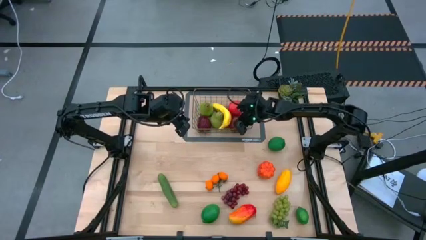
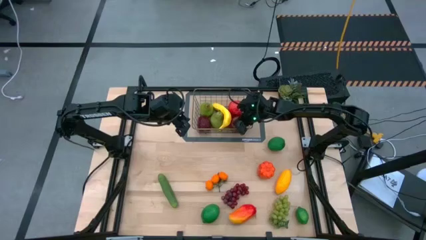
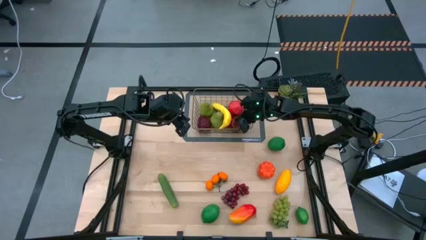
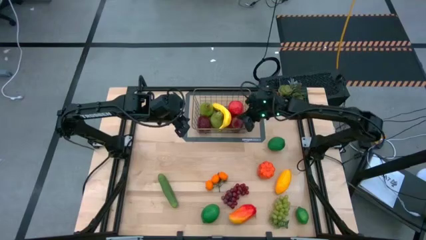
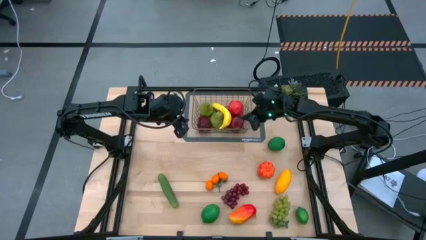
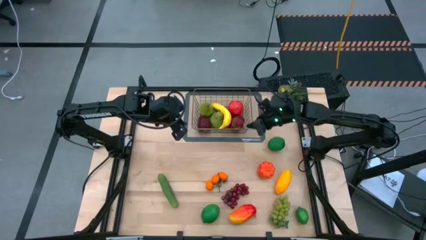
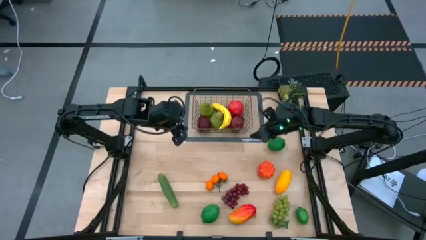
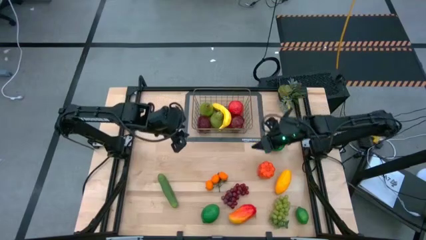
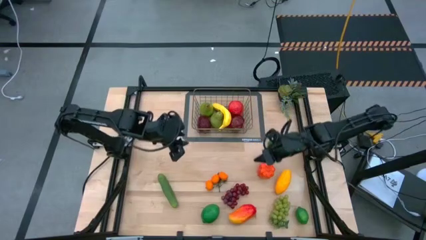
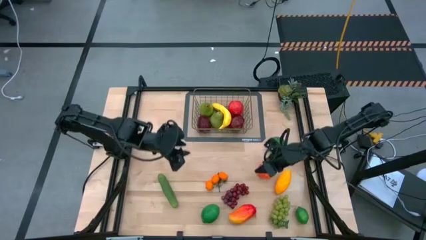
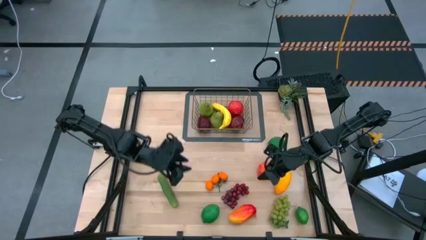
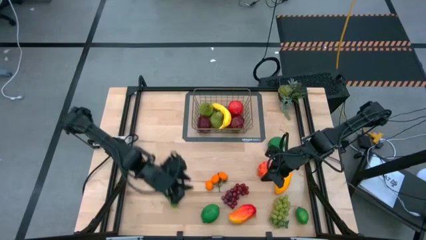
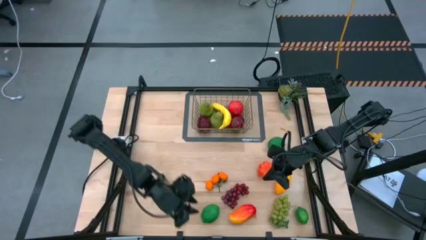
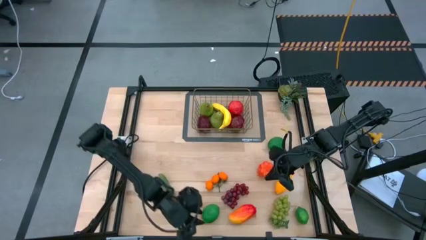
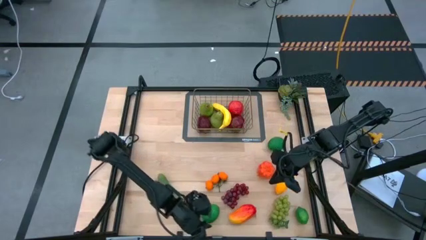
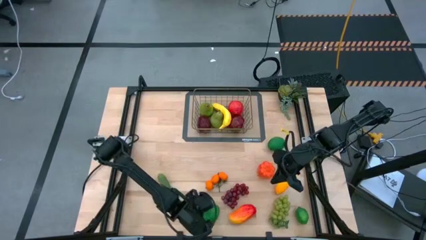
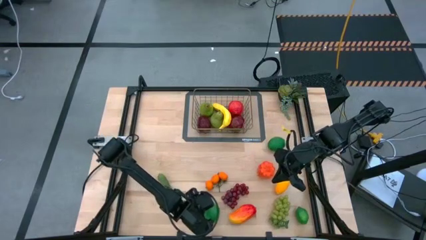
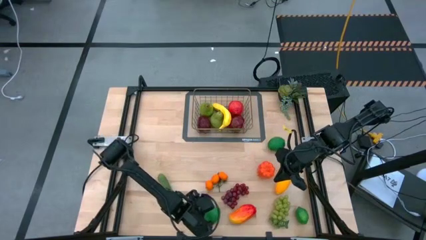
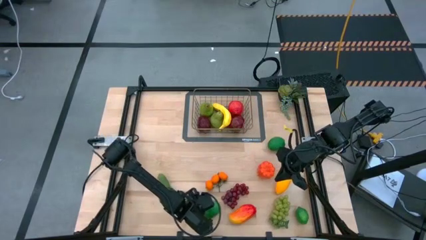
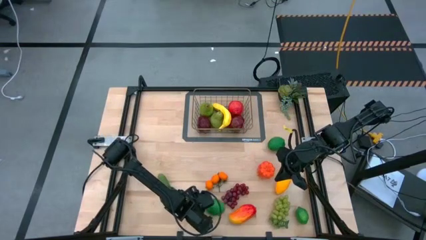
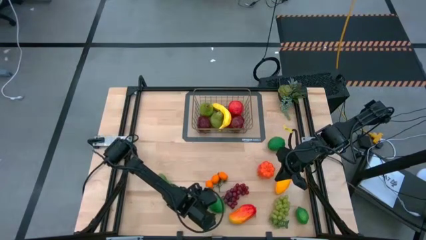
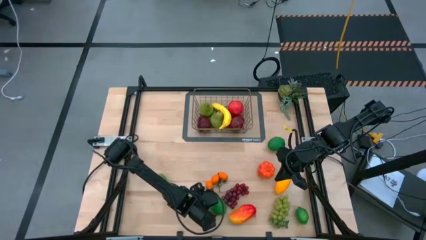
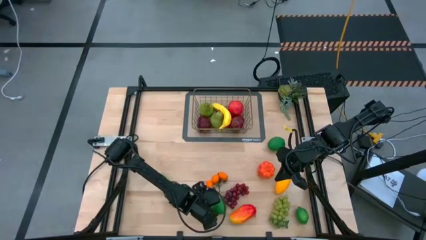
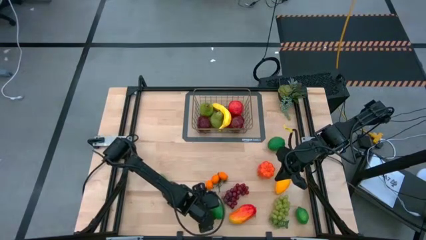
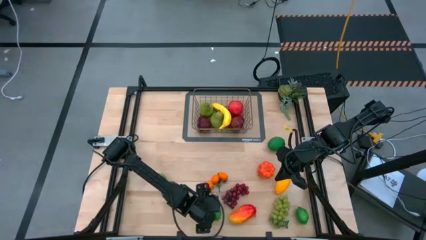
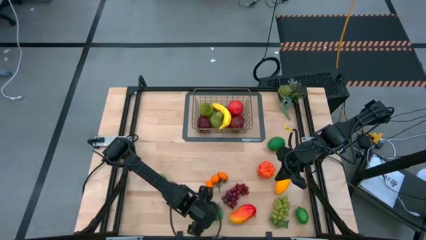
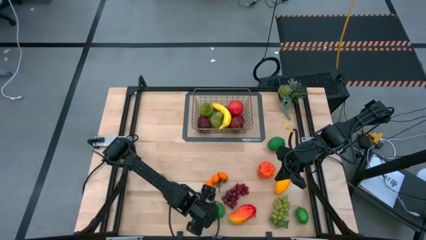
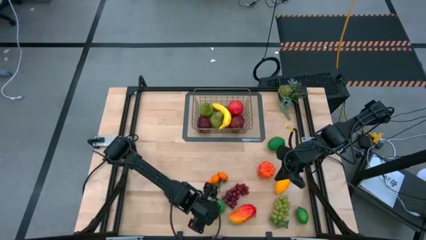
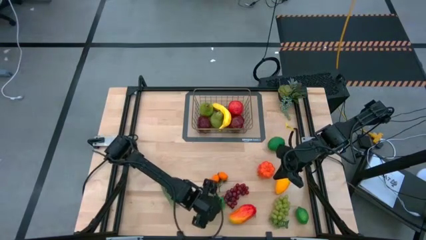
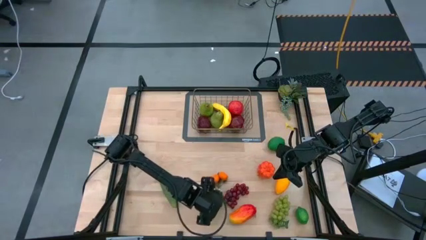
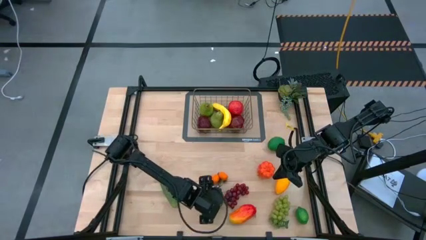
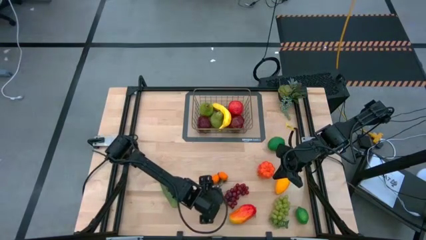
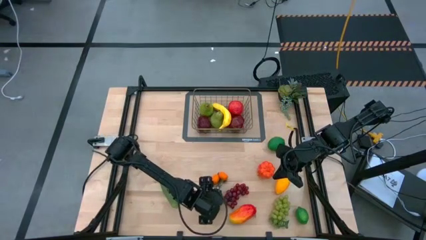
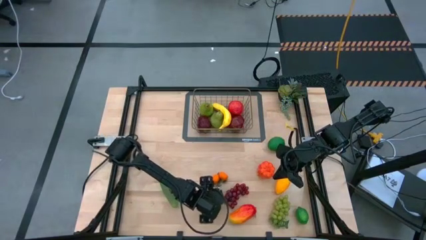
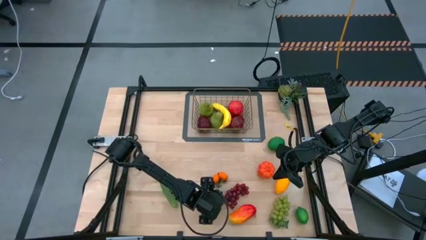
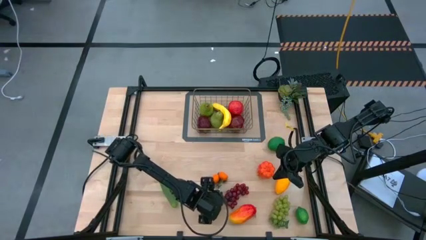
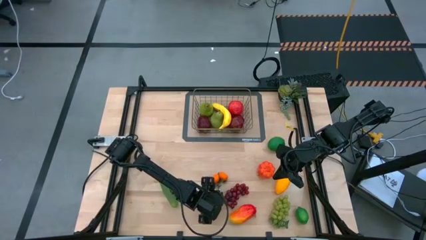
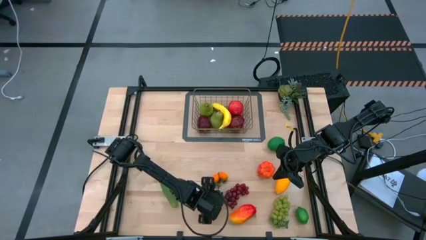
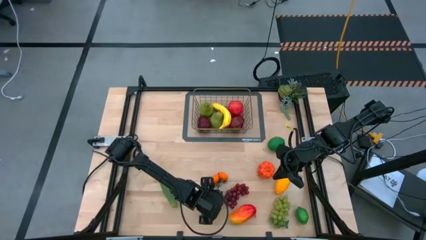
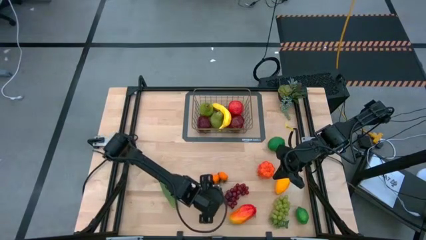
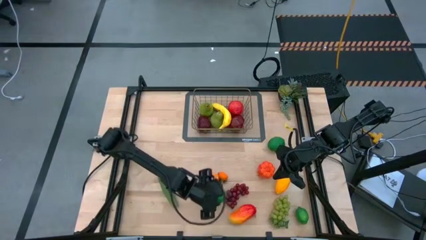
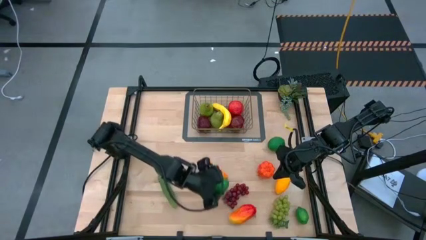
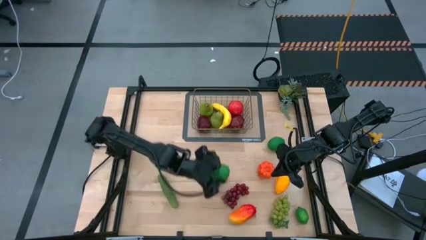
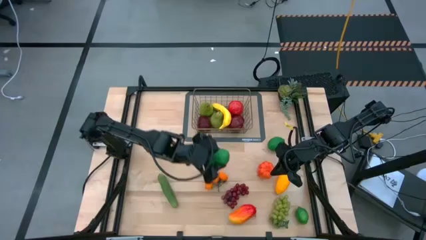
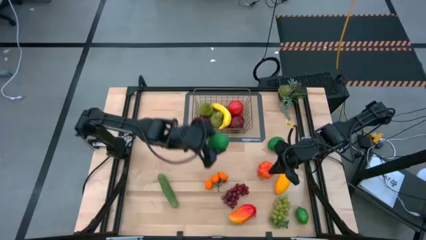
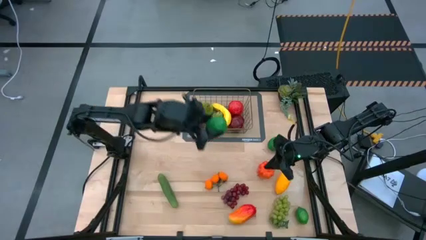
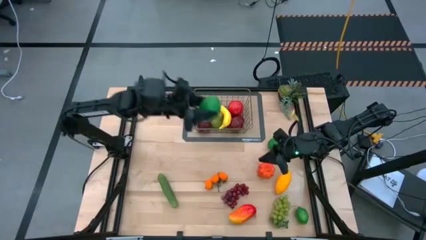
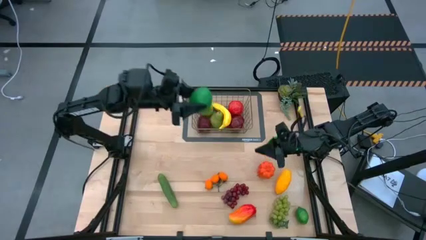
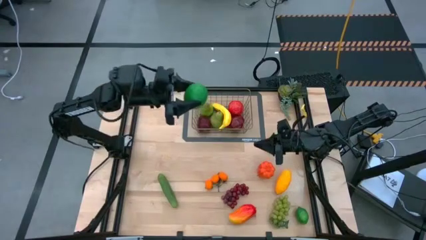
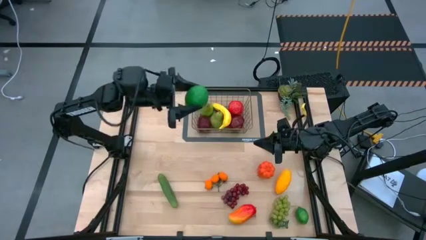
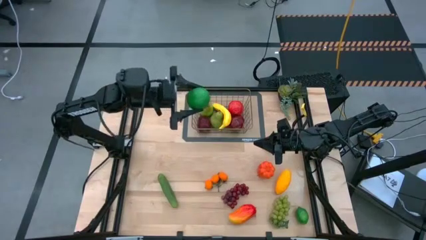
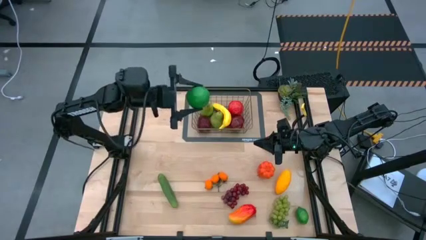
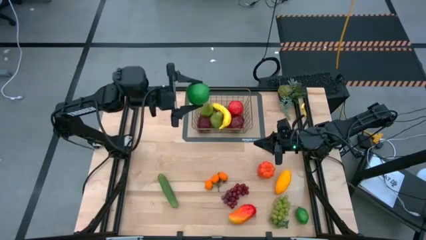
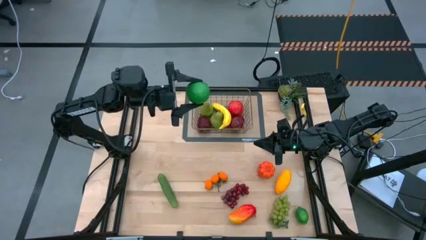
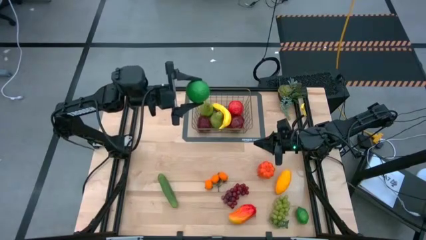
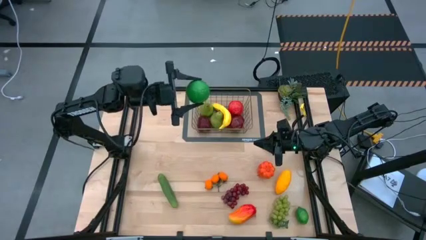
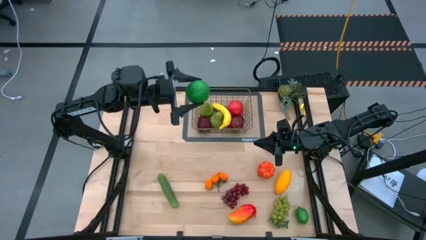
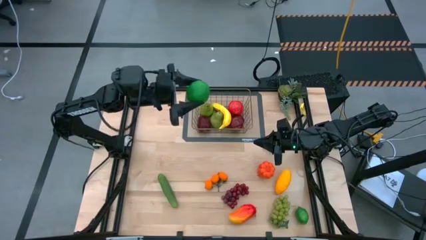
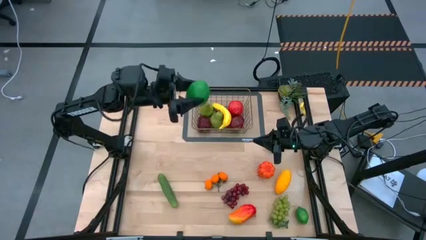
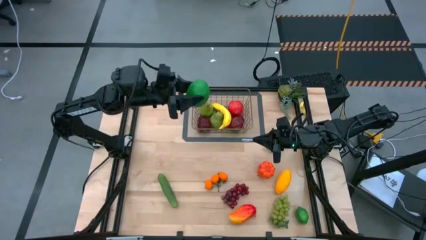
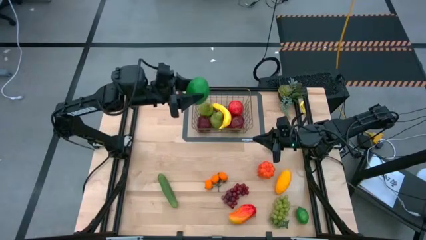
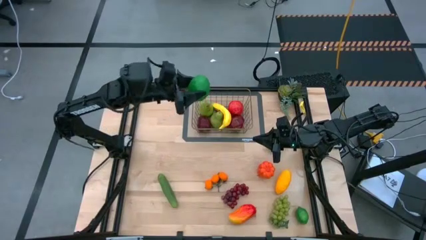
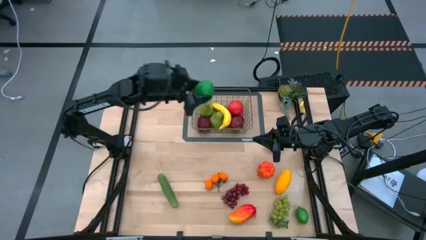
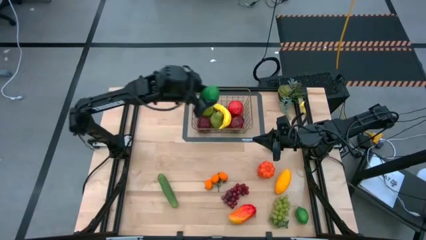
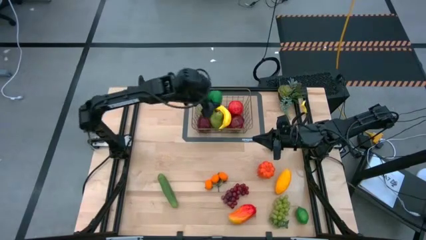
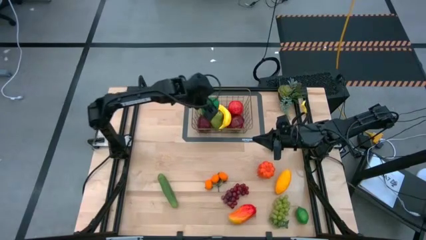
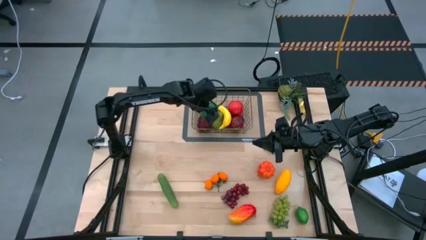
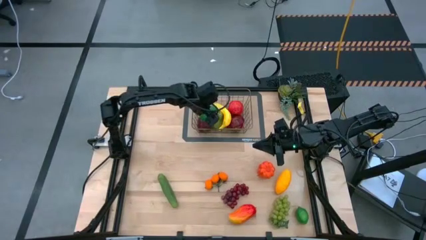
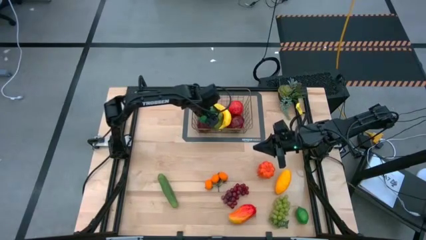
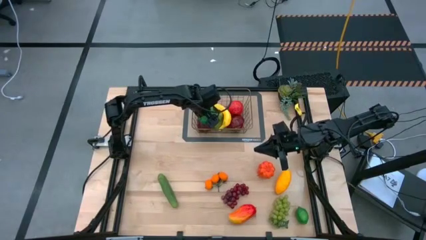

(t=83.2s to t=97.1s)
Task: Build produce basket
Put the bottom left green lime into the brown wire basket

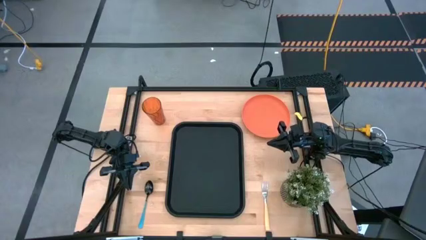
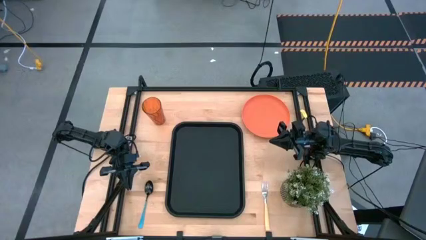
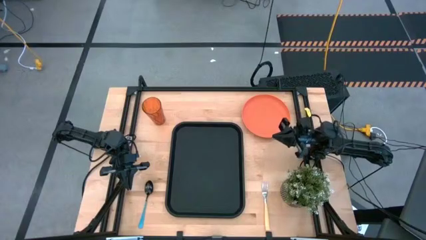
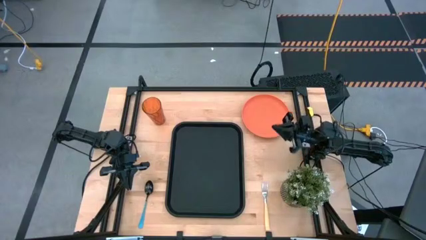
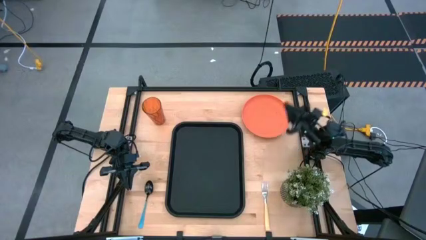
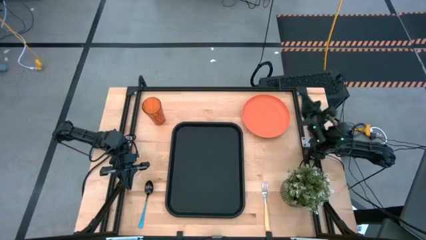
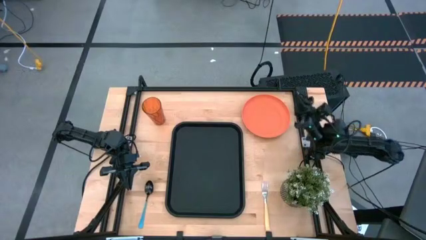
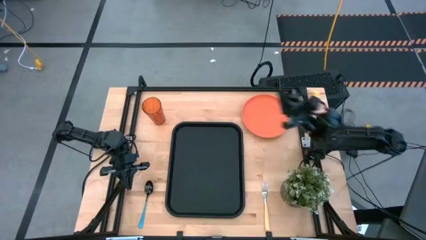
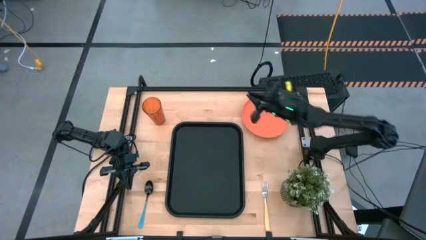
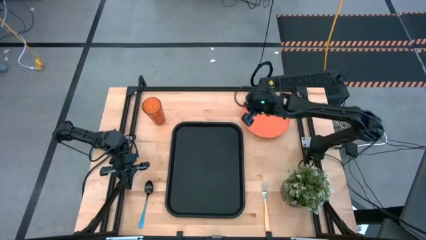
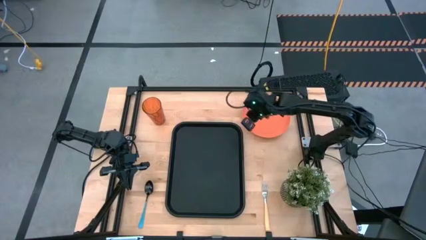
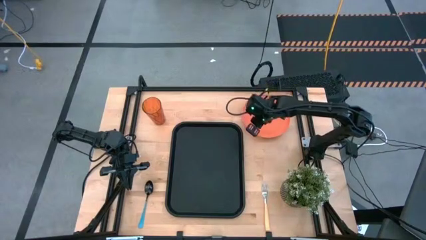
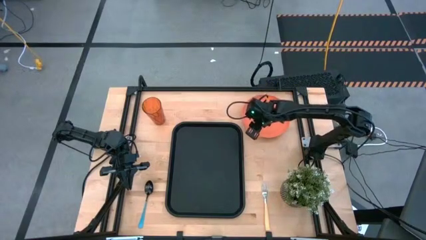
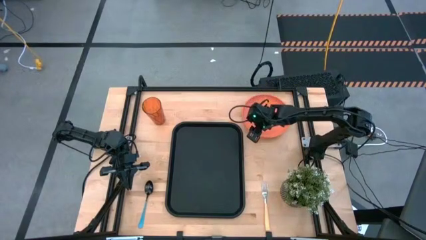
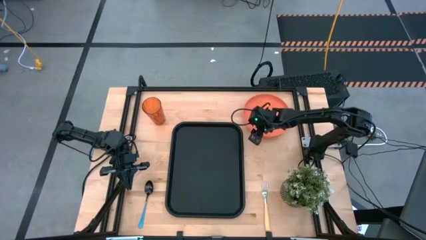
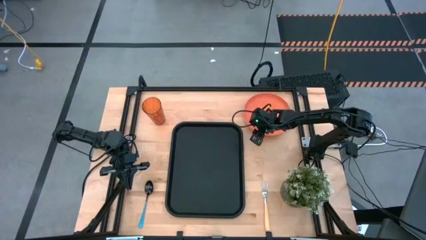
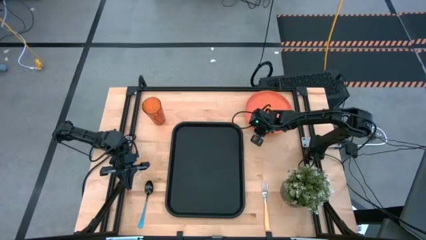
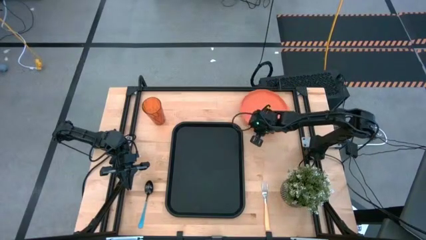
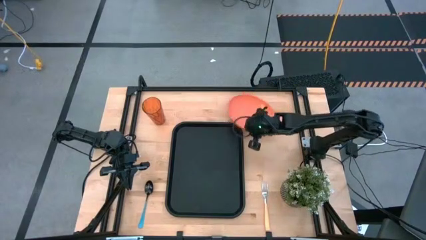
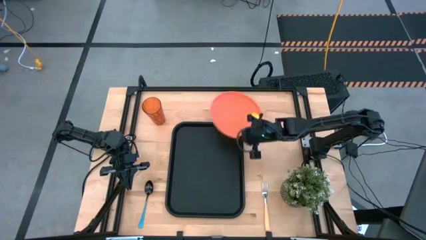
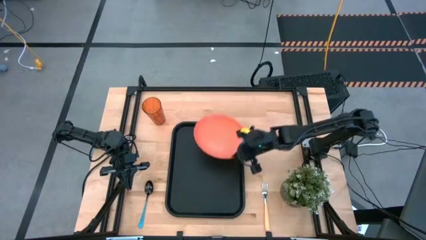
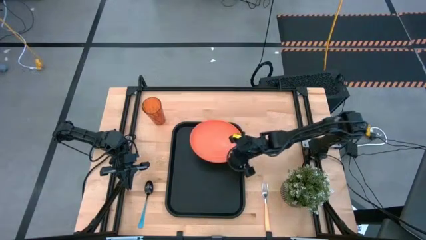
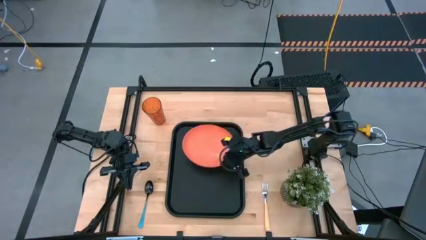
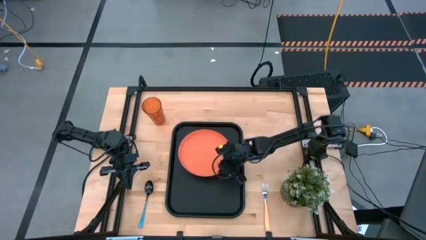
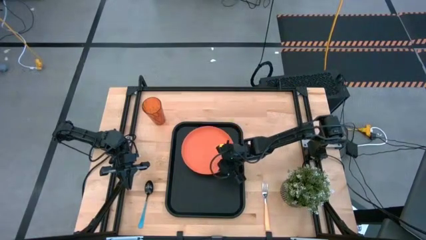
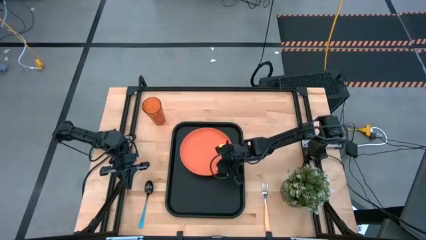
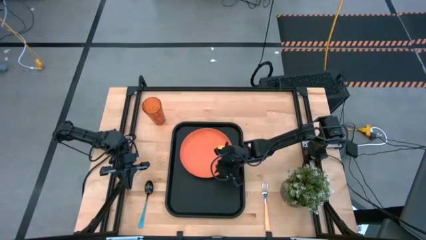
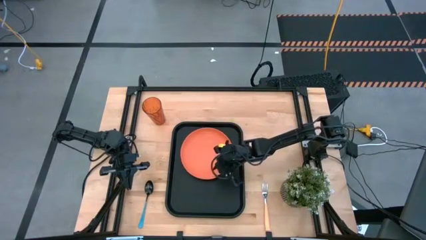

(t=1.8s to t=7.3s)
Task: Pick and place plate/cup/fork/spoon on tray
Put the orange plate on the black serving tray
